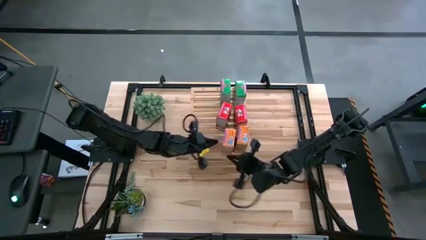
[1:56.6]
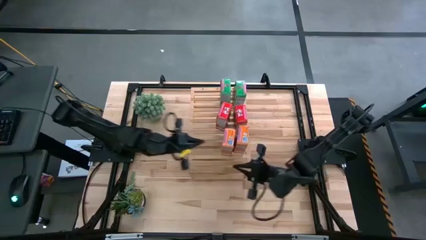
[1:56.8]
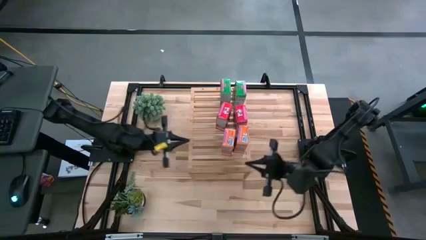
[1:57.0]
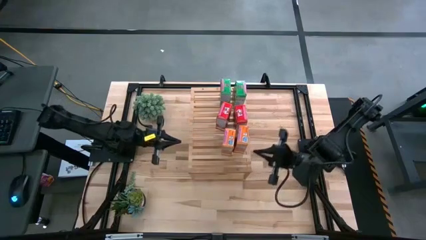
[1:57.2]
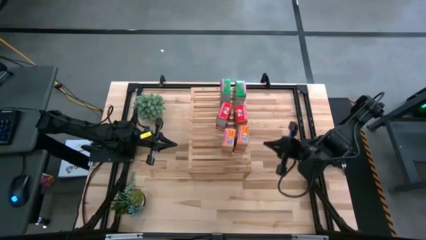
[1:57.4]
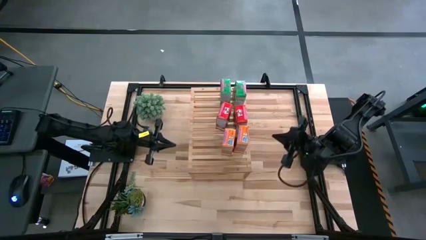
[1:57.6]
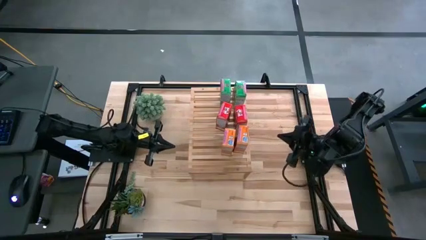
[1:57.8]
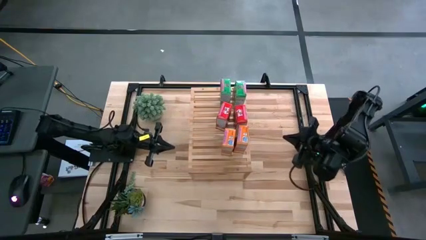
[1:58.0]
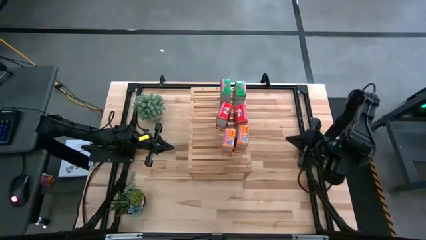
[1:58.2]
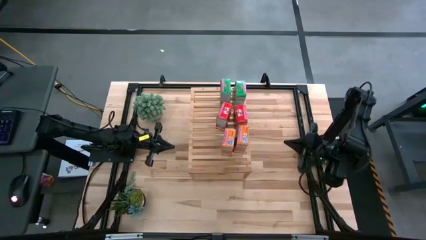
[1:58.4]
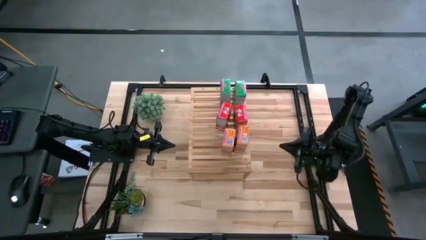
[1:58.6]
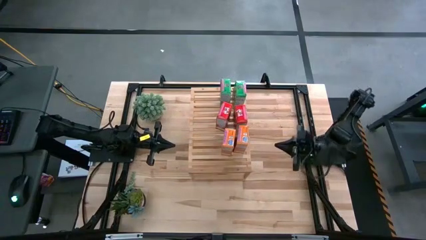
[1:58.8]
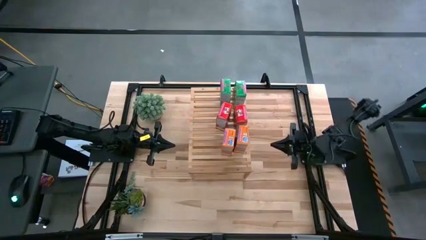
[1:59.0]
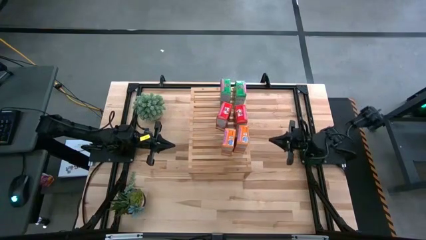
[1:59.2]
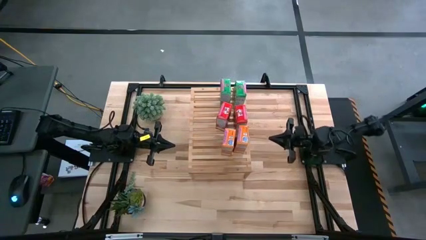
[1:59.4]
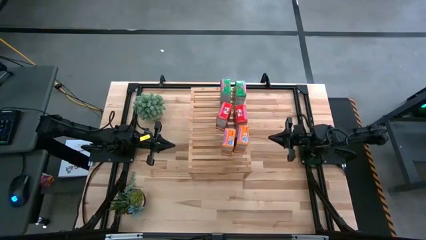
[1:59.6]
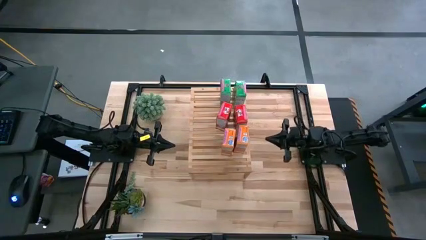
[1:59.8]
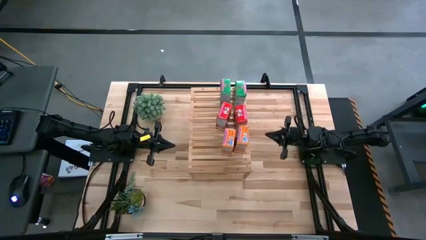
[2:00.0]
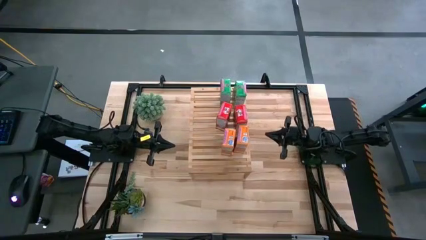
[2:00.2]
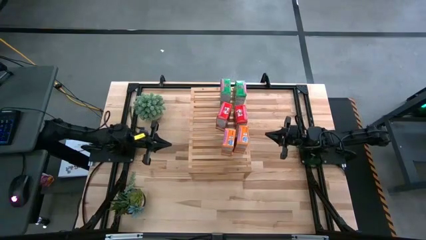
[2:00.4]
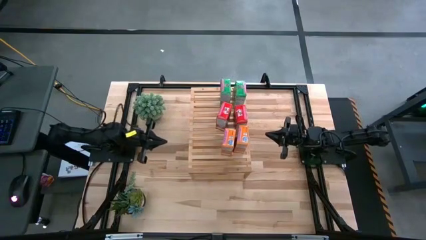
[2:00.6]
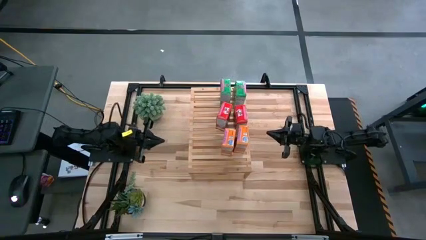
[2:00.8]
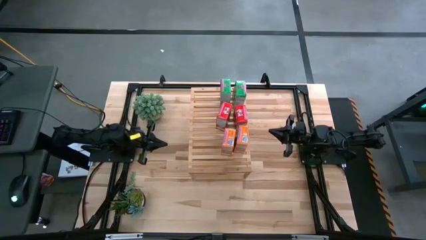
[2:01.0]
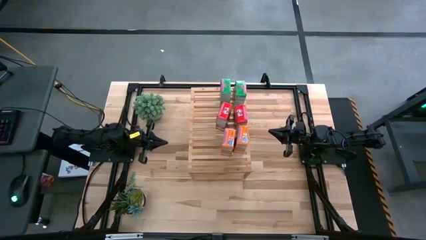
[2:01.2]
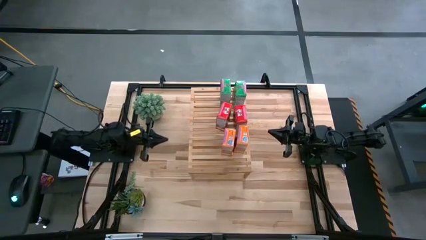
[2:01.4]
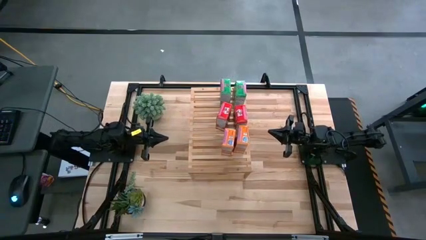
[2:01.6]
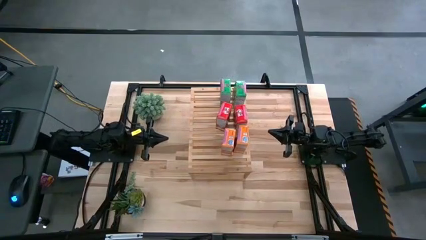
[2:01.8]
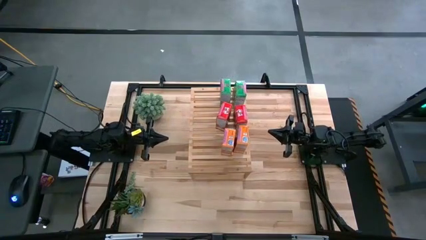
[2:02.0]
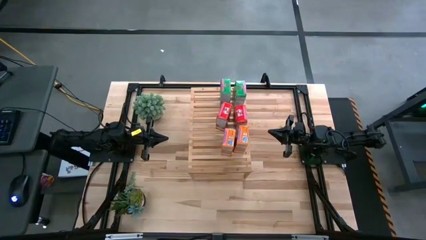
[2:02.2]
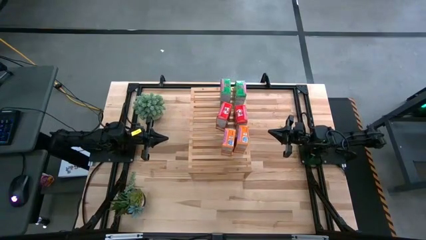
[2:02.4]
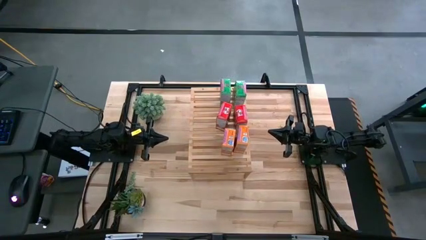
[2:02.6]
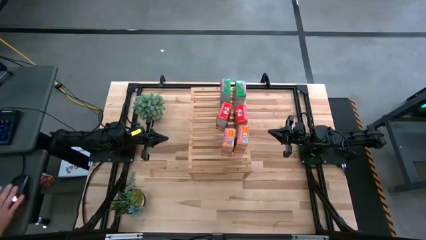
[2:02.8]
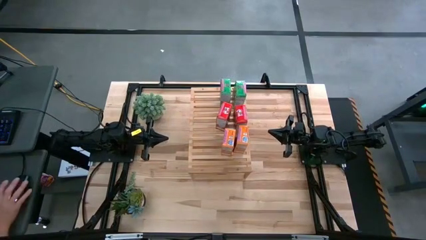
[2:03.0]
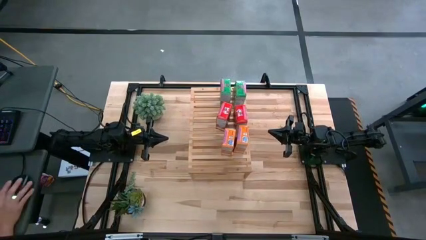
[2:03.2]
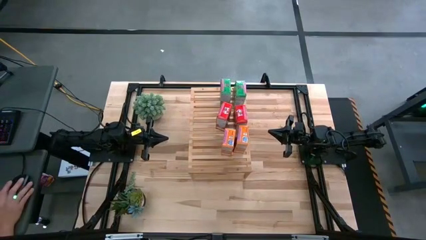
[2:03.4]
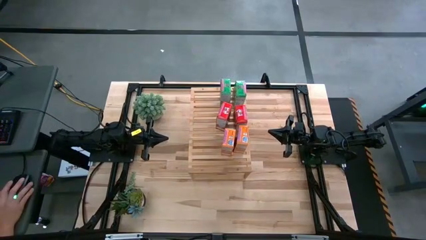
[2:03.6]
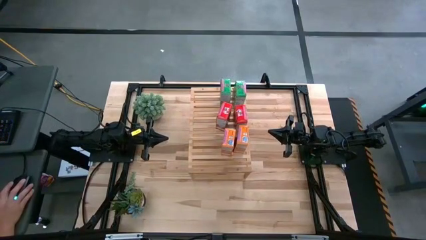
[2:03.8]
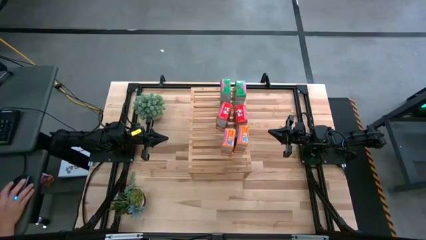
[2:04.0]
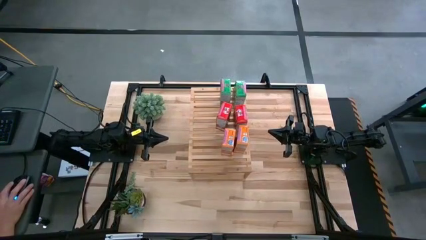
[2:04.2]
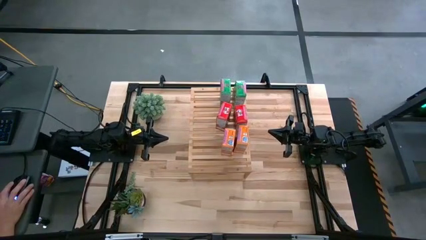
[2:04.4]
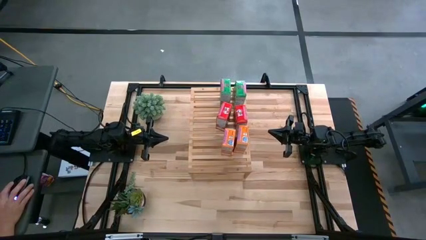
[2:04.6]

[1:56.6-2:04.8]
Task: Stack cereal on shelf
Return to Home Position

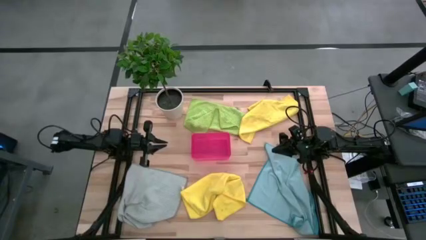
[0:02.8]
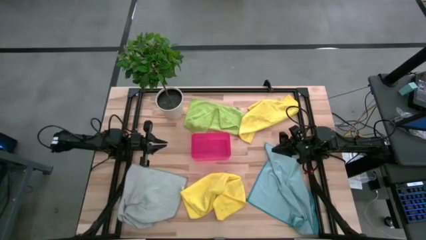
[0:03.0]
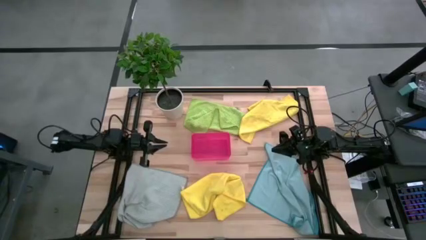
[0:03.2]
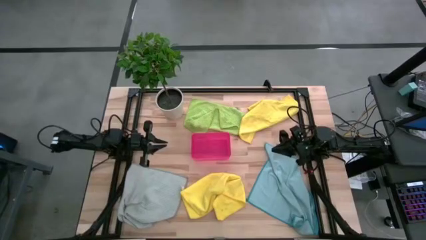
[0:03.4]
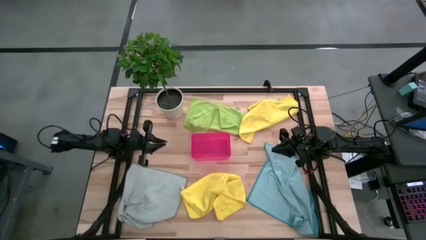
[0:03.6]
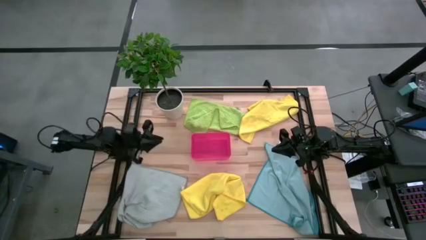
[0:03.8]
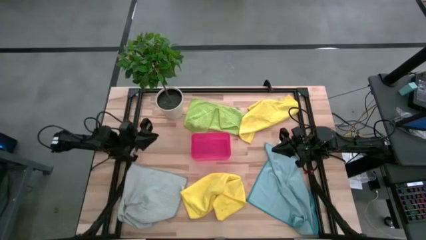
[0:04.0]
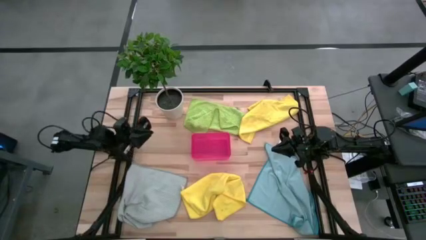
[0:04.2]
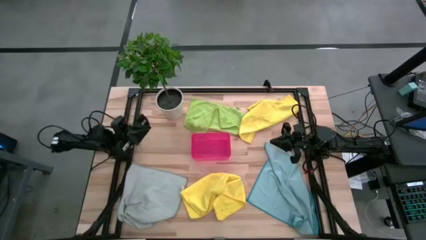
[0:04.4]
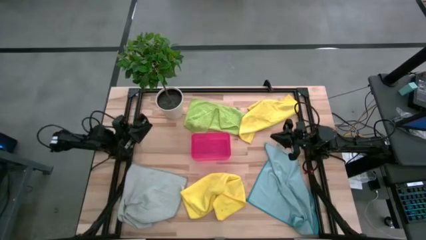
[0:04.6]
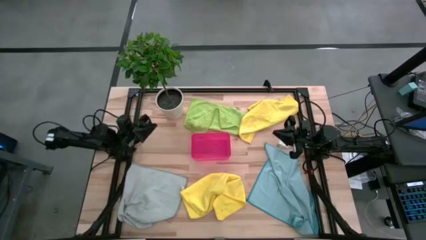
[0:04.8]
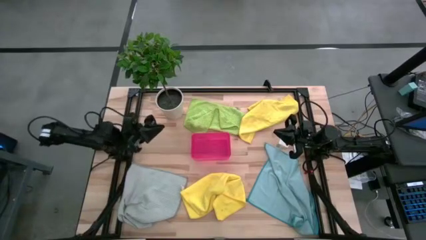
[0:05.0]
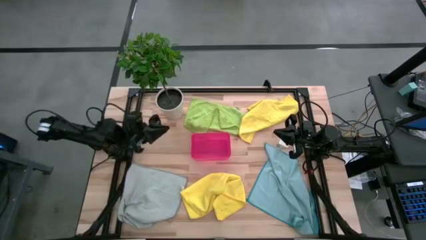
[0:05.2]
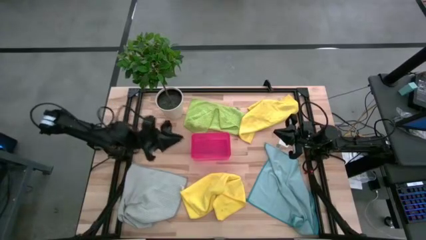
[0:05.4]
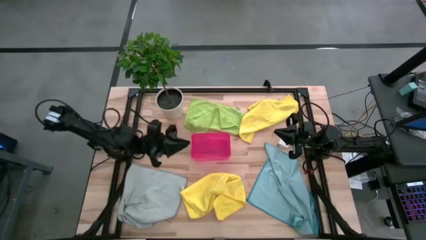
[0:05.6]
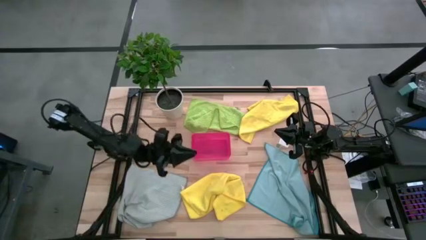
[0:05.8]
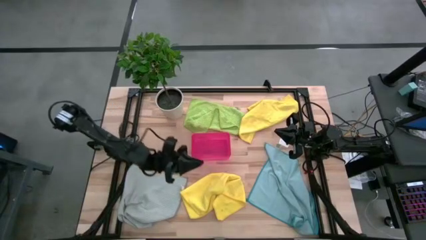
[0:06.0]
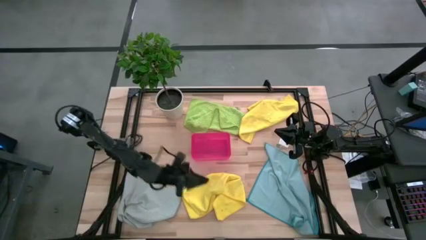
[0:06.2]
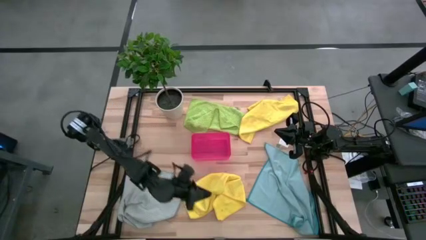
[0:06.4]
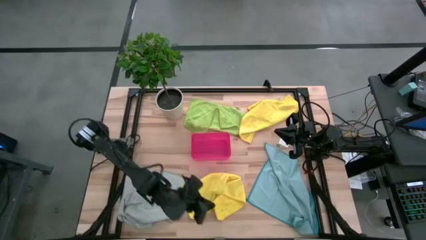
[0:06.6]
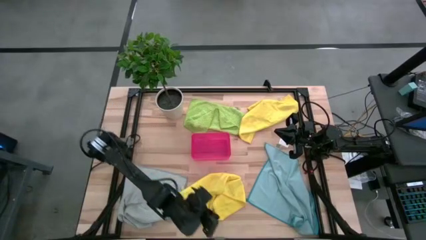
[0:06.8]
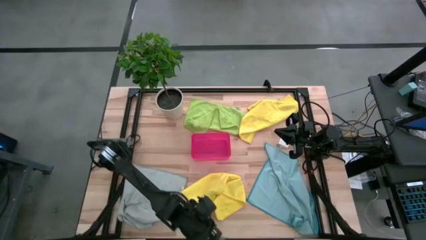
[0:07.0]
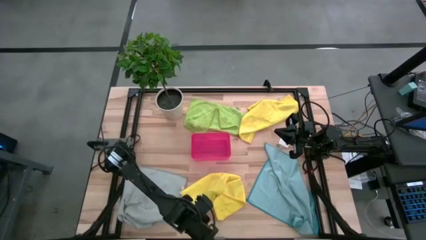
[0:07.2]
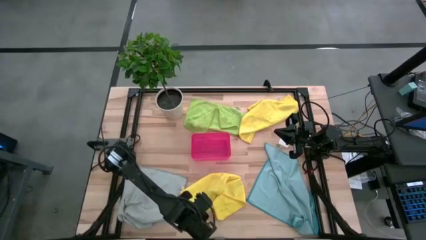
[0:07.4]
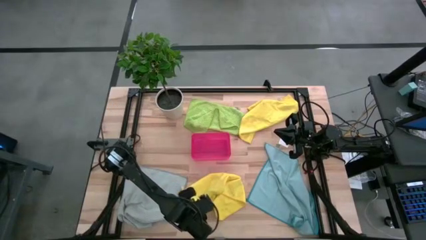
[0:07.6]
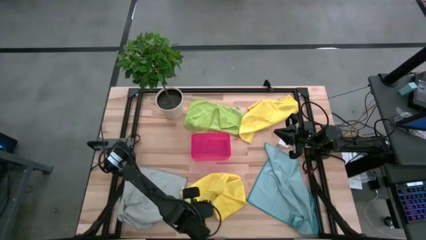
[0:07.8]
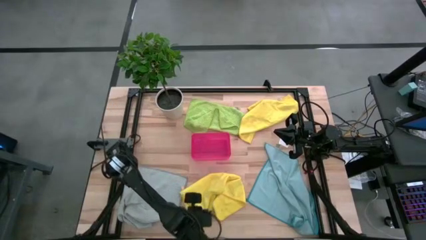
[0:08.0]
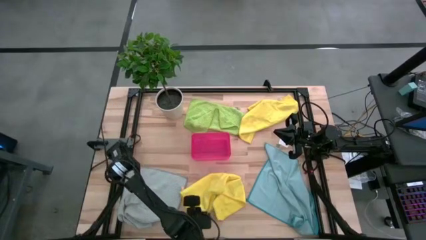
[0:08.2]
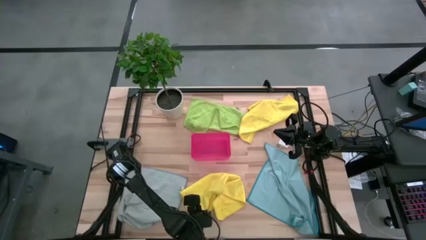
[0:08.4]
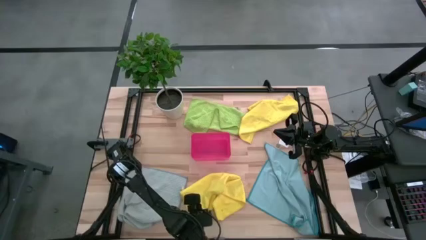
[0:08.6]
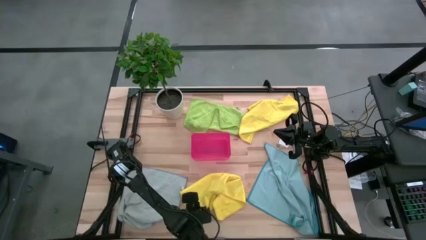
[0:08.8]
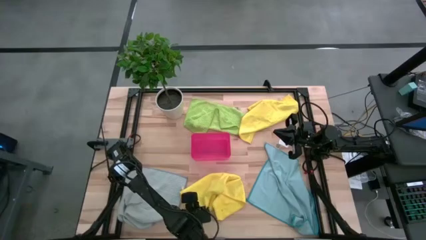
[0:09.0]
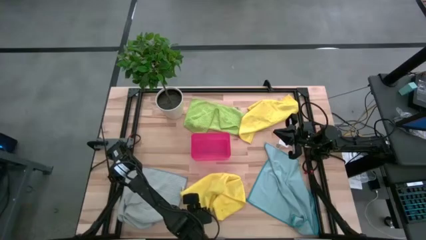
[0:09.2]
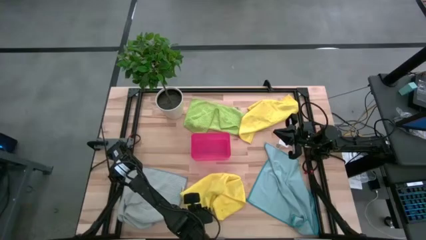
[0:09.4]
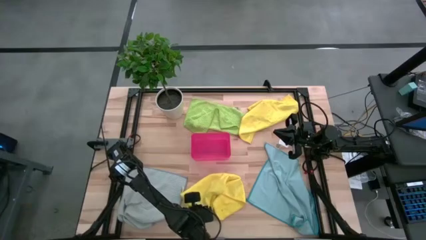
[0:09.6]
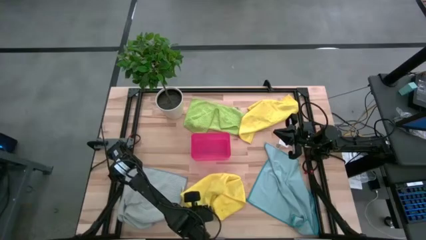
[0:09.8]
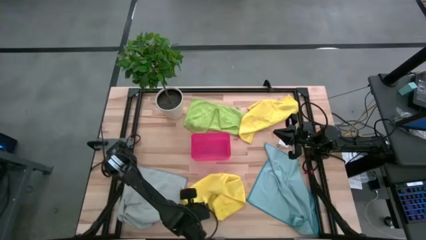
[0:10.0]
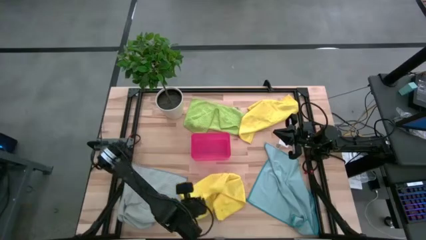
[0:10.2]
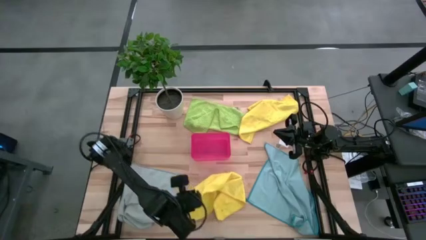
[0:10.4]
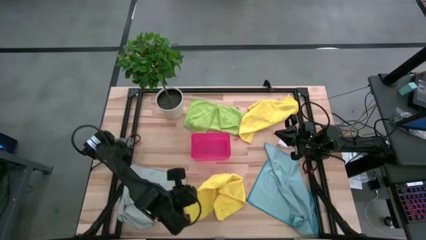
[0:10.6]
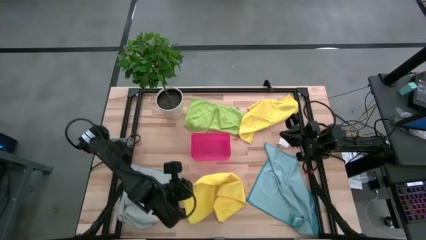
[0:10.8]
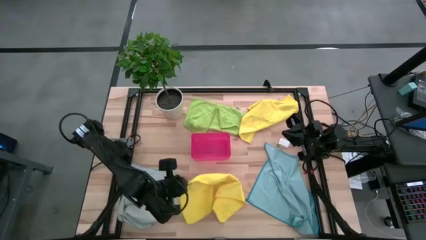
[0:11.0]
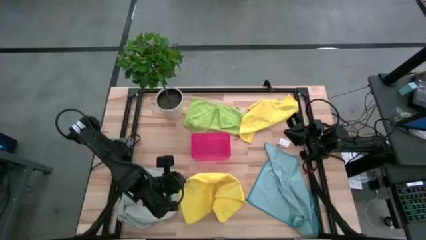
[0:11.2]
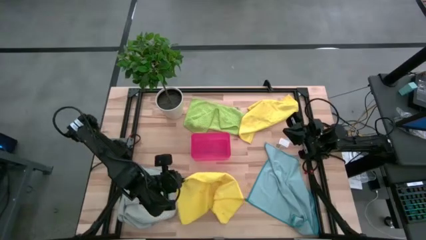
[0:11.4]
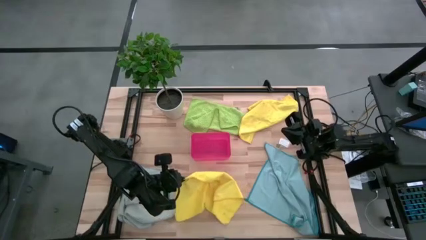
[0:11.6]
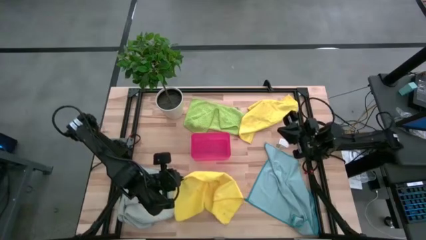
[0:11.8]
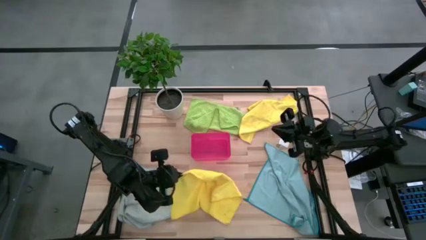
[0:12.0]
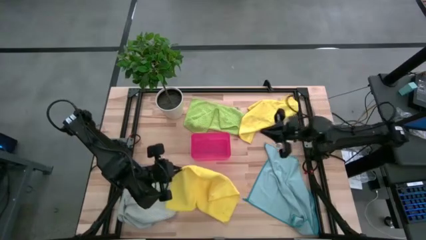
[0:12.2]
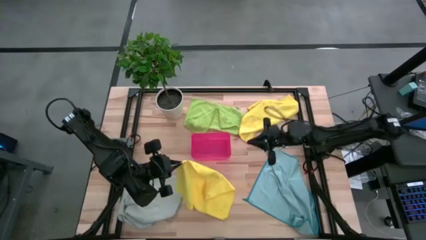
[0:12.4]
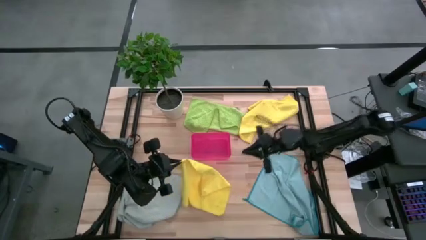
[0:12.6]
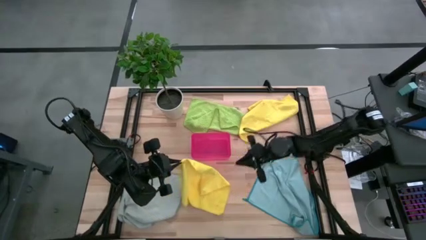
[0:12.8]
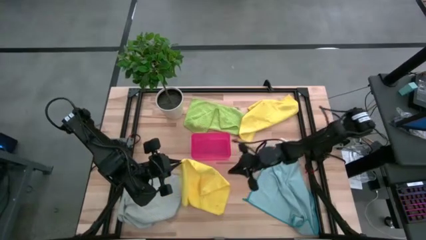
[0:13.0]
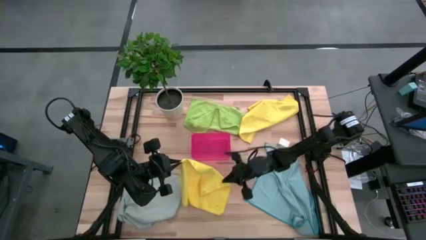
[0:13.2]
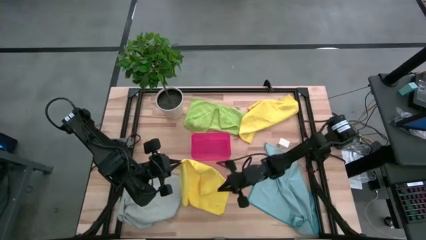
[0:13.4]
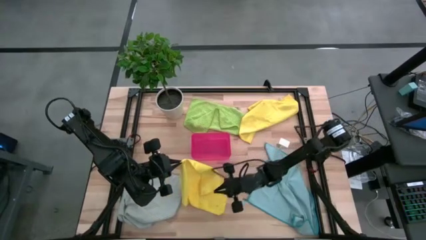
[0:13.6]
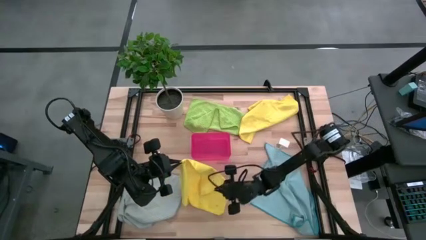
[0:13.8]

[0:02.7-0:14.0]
Task: Fold microfiber towels
Fold the bottom yellow microfiber cloth
